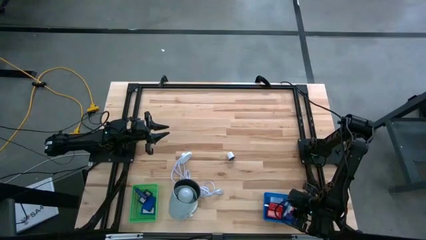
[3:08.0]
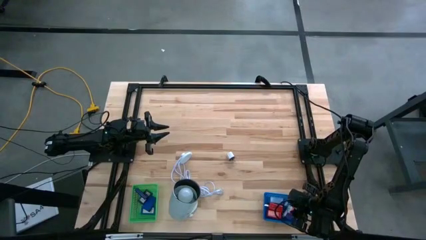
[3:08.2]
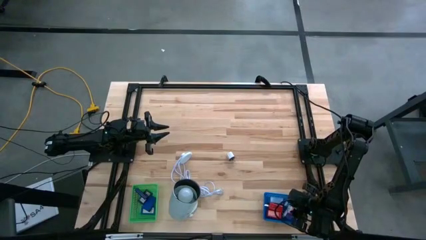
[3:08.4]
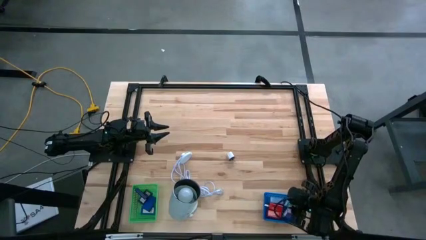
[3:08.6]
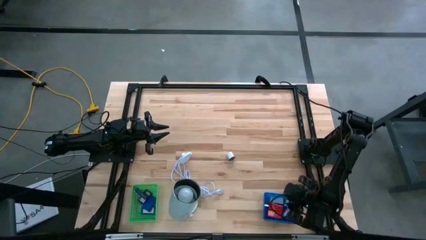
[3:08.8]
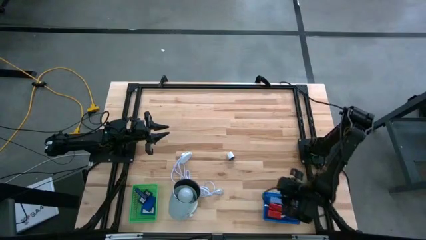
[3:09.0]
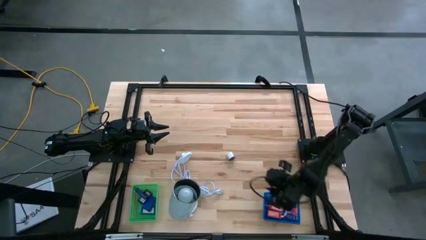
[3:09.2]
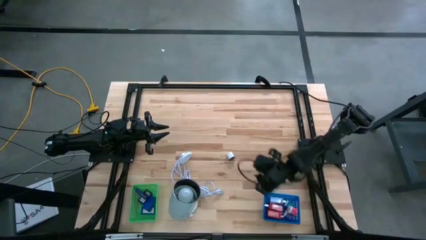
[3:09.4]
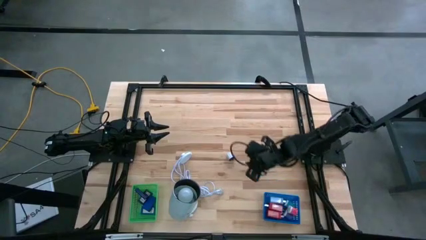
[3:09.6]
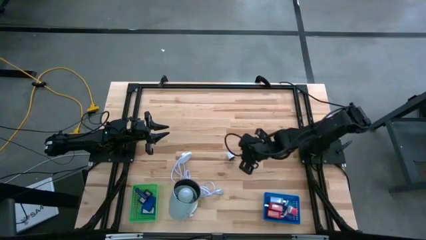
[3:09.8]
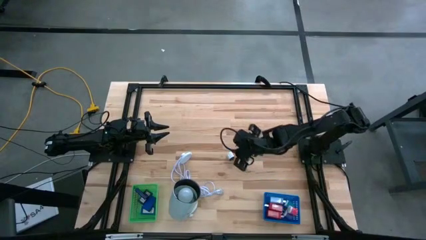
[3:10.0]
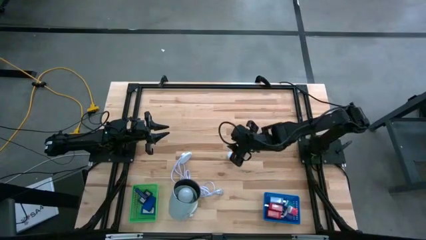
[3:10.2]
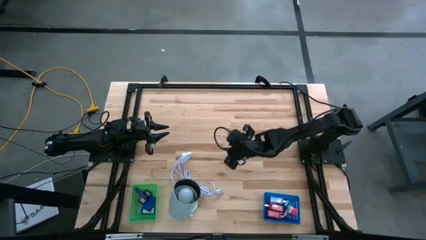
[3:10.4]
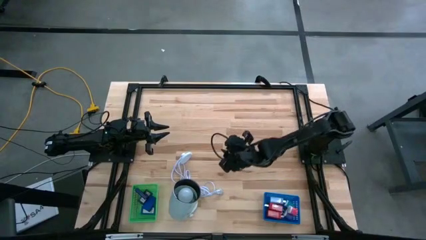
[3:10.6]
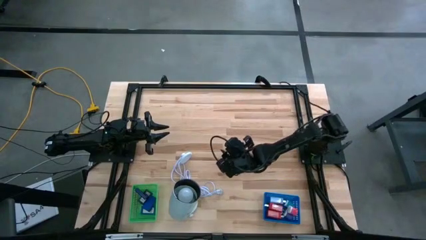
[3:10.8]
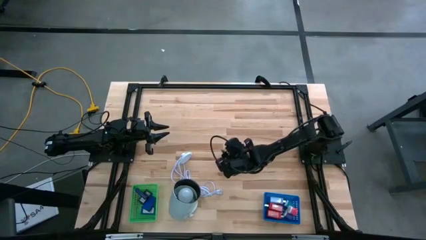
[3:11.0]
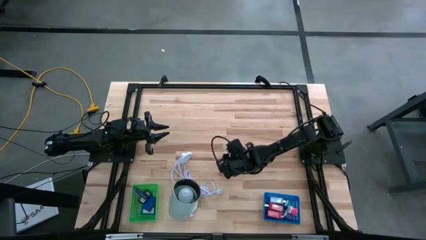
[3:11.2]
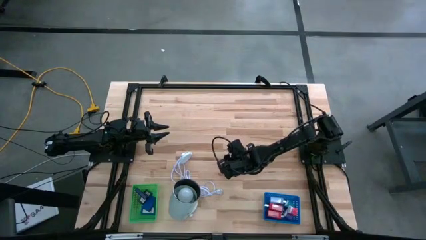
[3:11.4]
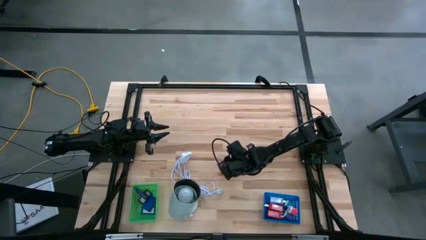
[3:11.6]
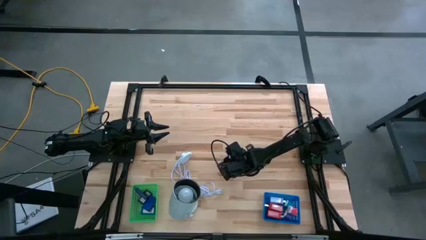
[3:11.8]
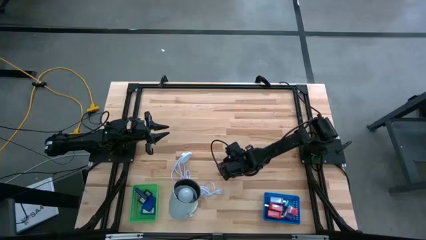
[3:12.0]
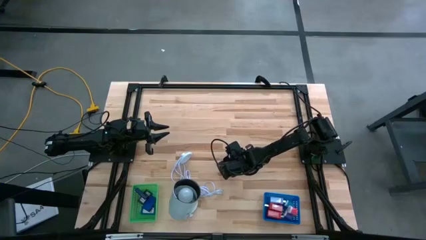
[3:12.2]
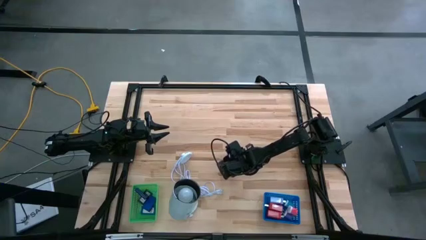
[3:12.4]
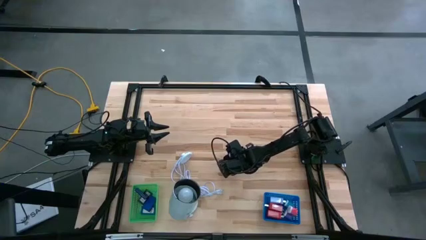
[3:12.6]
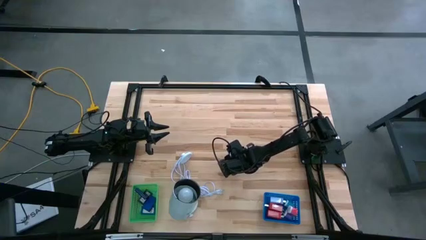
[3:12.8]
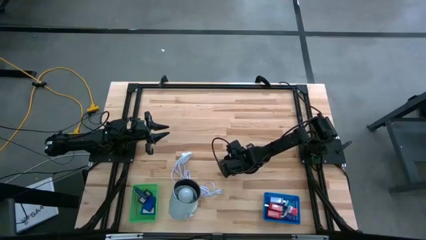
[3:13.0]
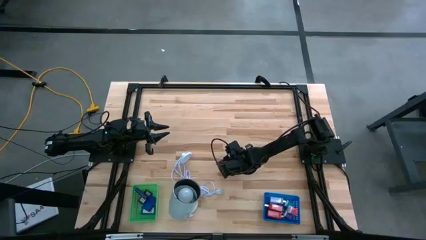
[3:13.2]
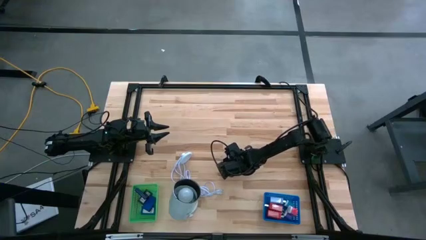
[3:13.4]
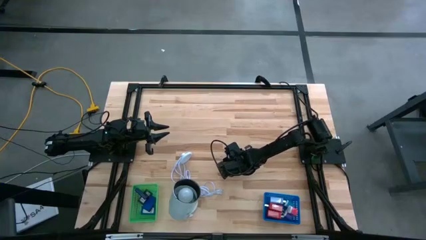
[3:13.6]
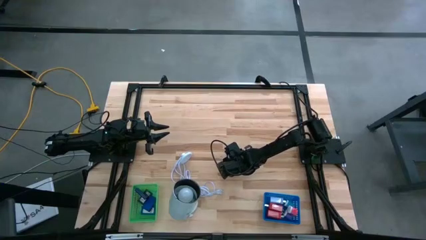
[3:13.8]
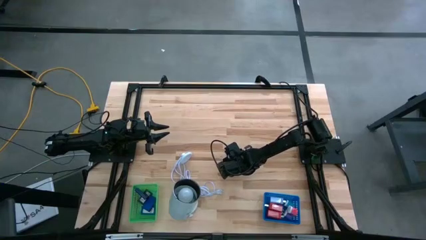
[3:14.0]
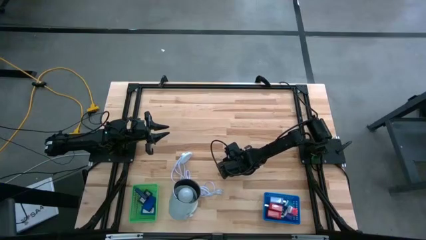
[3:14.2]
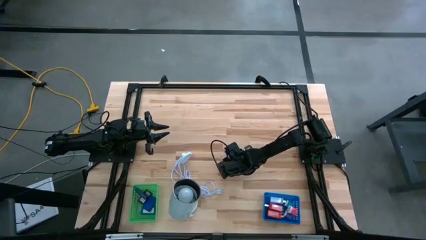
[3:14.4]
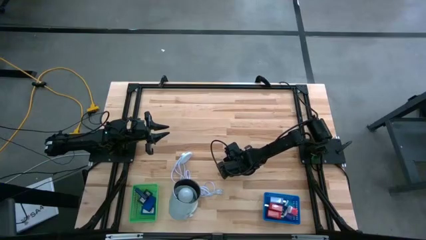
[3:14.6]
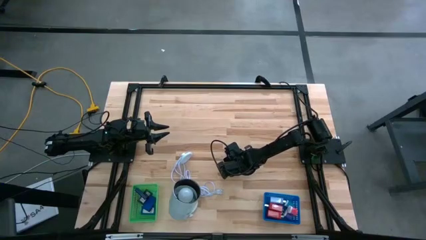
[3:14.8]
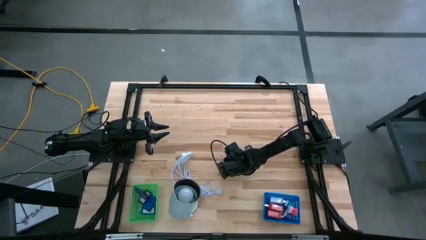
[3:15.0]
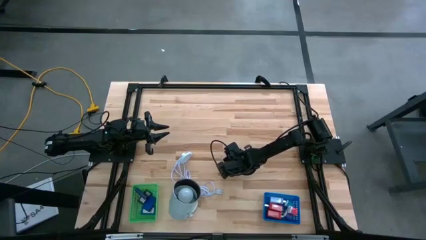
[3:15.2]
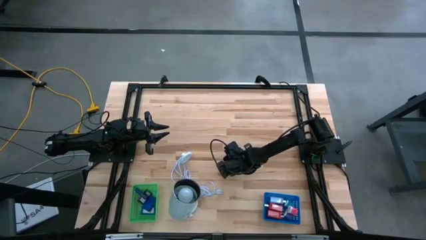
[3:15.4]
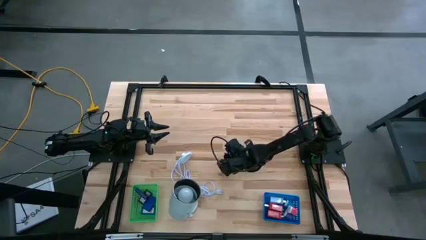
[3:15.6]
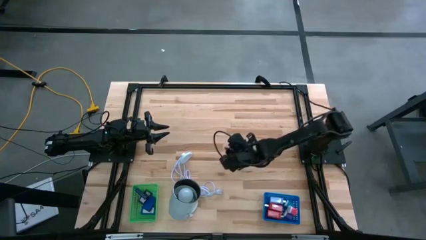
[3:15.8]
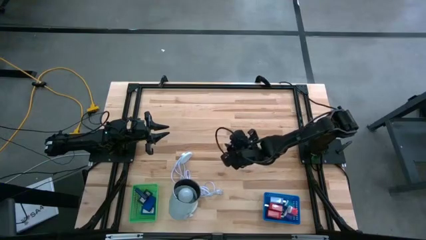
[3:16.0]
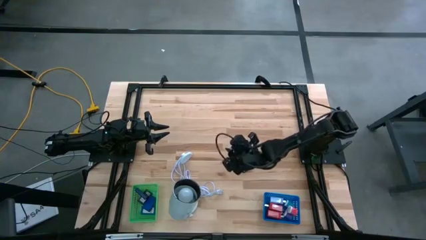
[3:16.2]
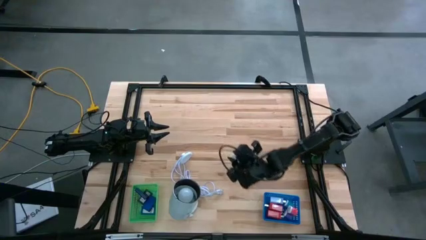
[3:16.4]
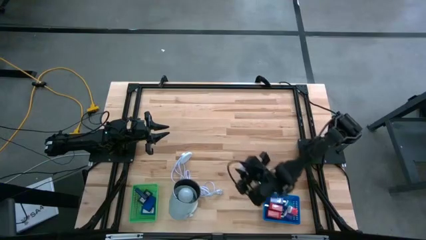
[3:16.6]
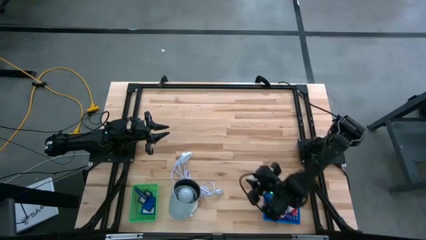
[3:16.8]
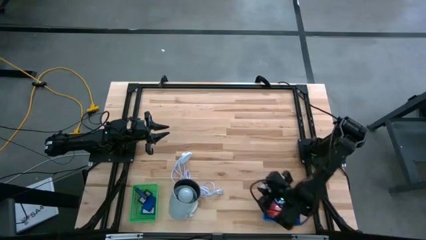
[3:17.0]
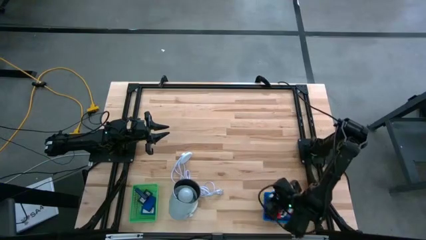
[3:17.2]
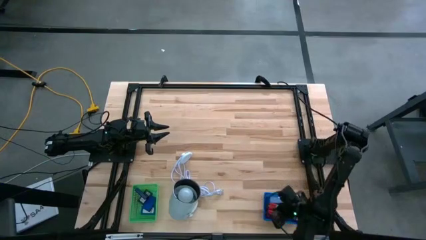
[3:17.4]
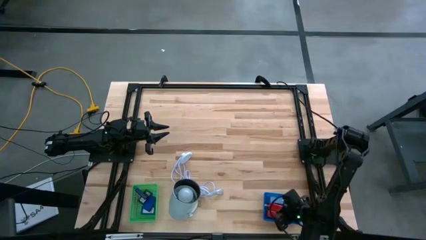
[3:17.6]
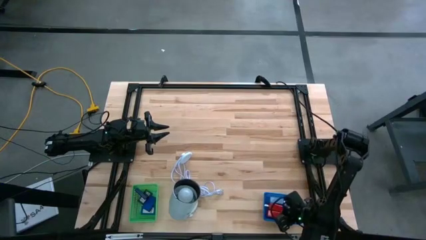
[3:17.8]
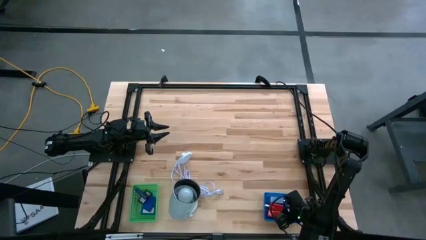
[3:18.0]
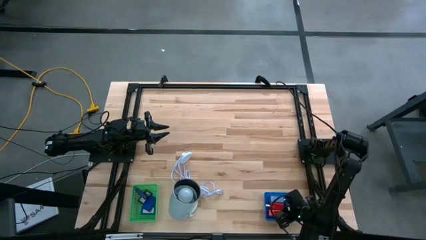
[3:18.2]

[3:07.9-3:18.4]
Task: Pick & Place Office items
Put the white charger adapter into the blue basket

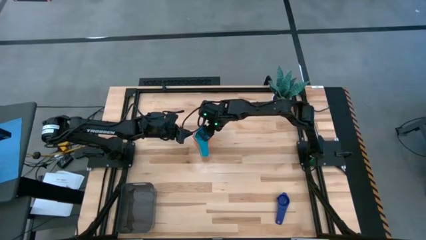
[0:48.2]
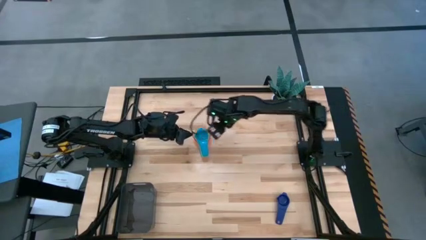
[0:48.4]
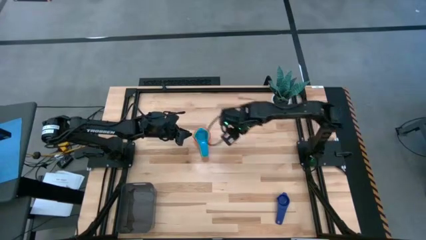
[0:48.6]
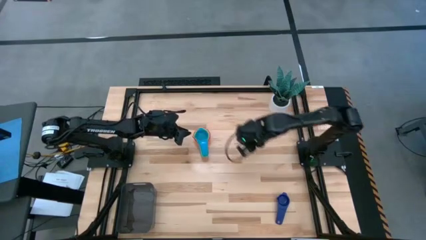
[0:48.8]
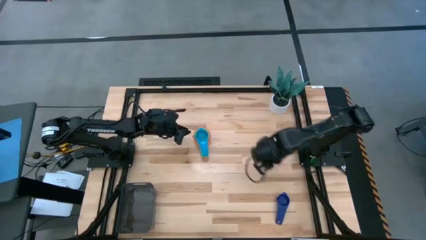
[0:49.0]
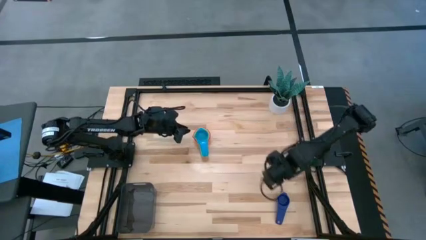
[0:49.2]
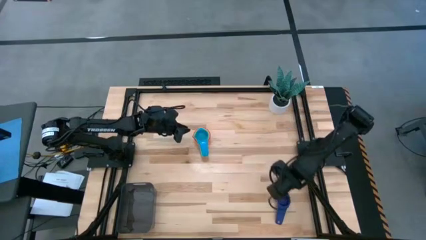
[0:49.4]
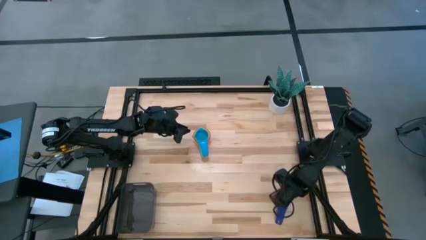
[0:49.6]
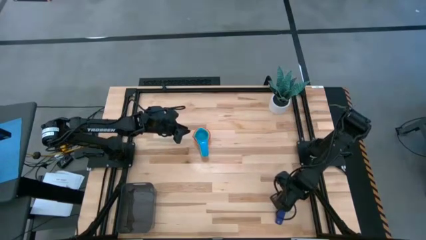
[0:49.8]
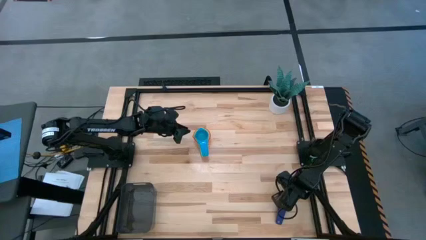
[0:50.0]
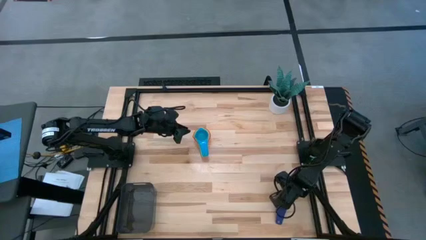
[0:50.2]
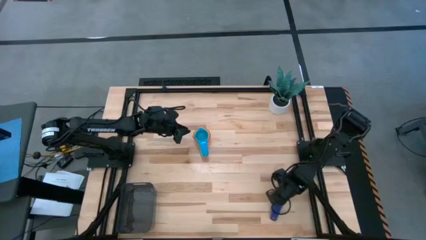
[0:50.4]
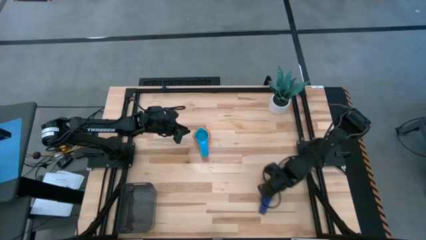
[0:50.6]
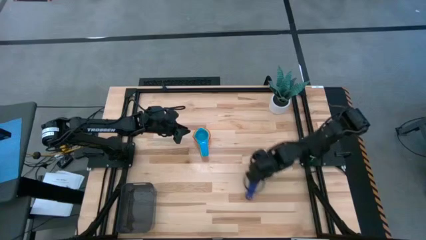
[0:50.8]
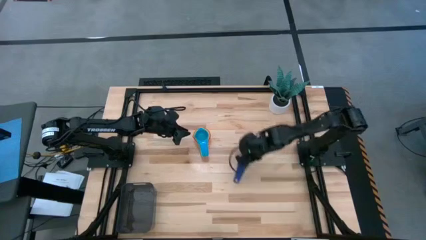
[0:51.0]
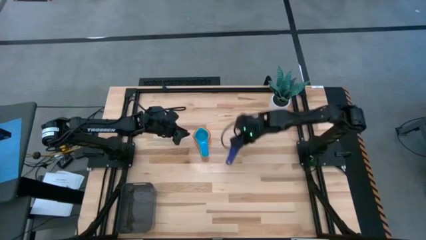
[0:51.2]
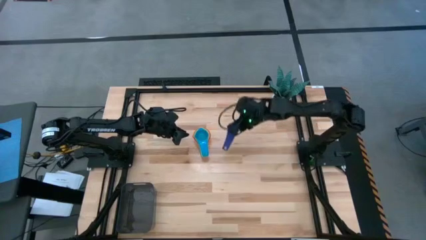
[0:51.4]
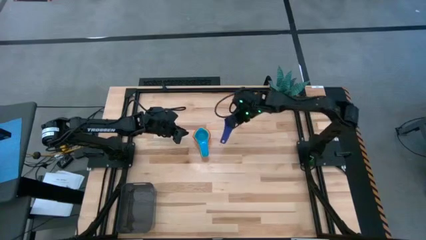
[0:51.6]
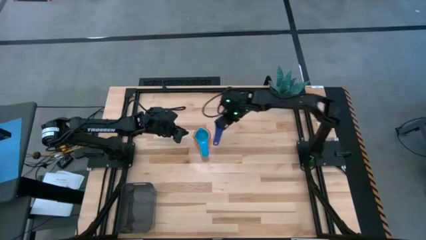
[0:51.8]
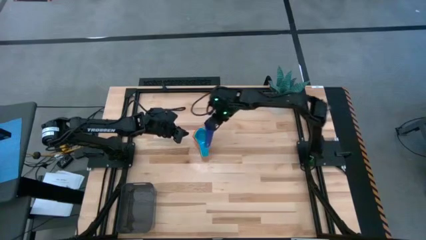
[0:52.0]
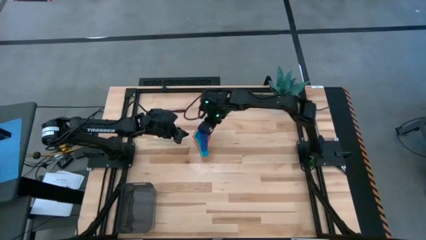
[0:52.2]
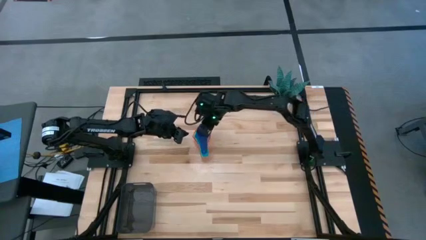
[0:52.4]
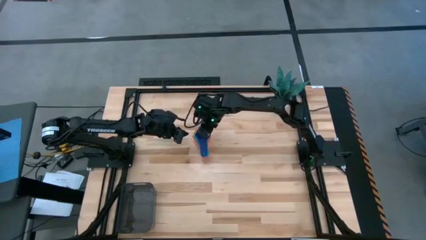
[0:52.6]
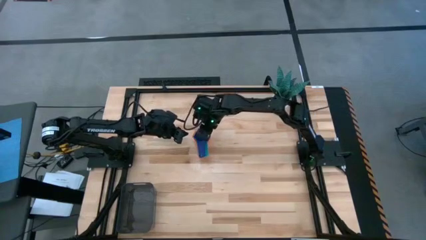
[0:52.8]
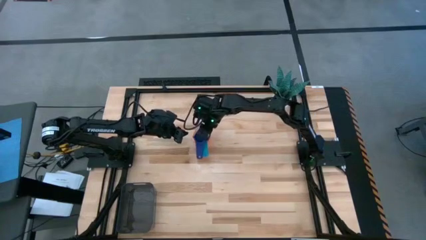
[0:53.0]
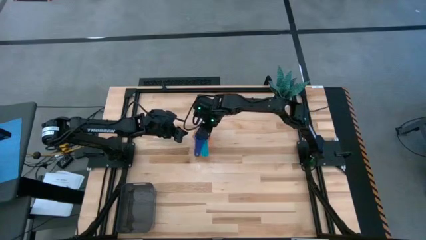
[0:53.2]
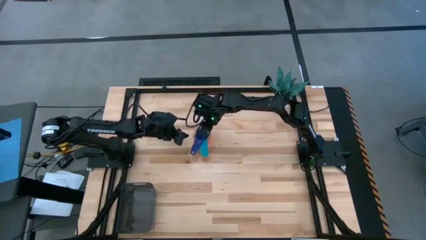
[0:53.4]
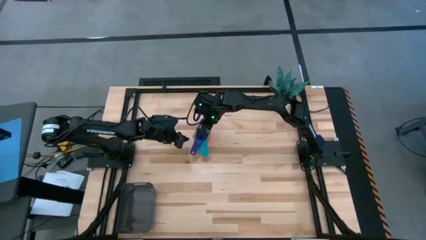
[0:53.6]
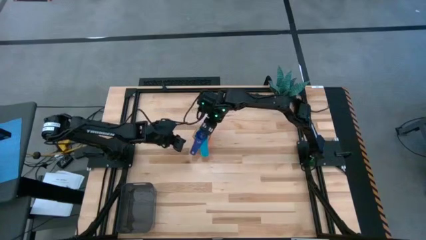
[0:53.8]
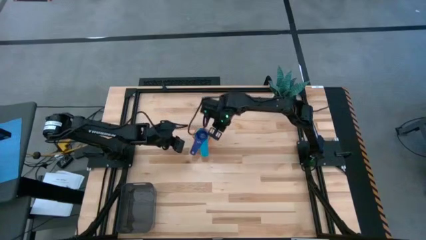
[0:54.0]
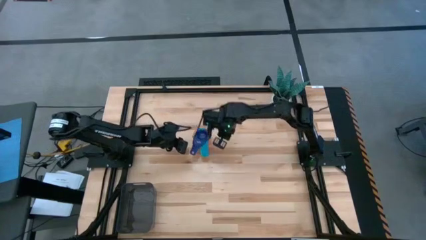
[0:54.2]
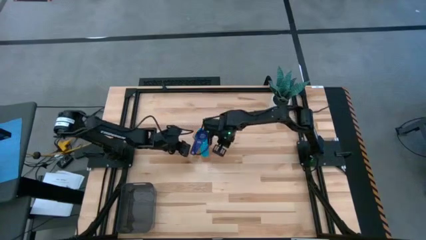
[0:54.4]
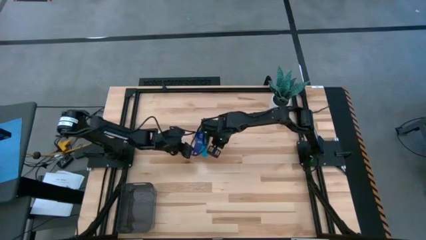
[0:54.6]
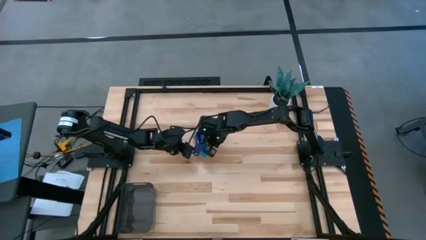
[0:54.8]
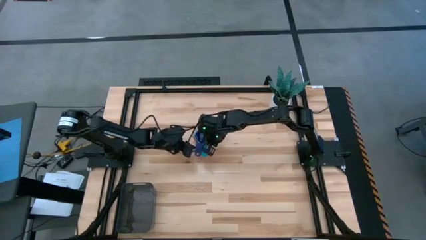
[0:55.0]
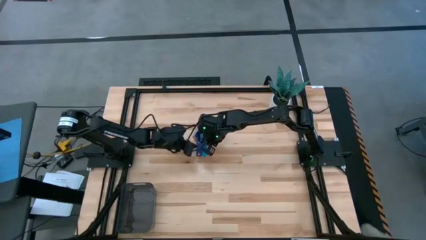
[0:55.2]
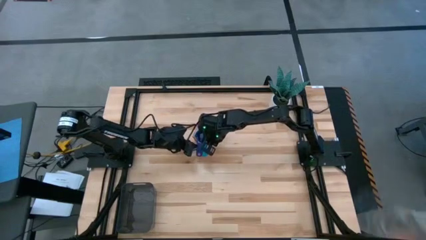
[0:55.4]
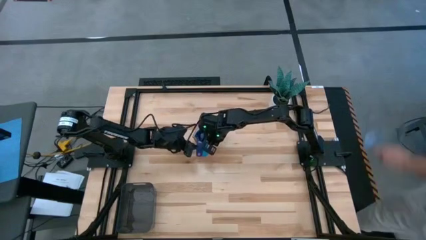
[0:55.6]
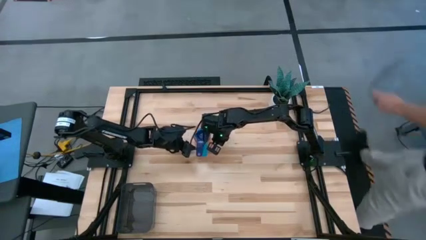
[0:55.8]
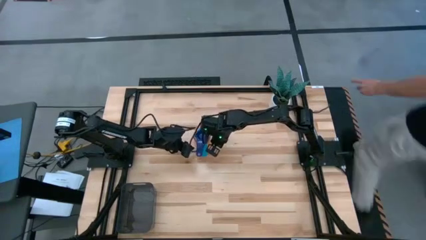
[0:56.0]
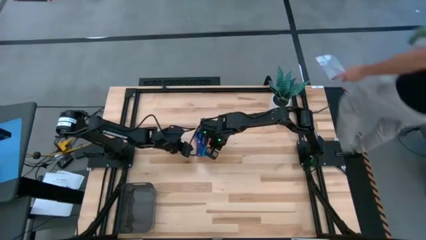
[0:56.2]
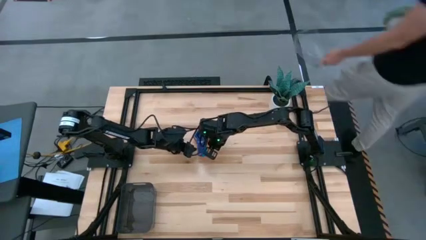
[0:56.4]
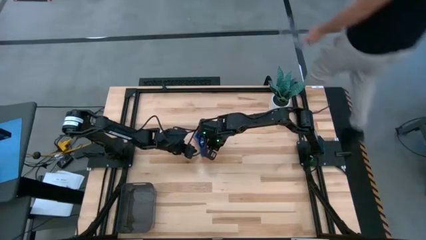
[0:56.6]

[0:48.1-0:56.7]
Task: Nest measuring cups in basket
Stack the purple measuring cup on top of the light blue measuring cup
